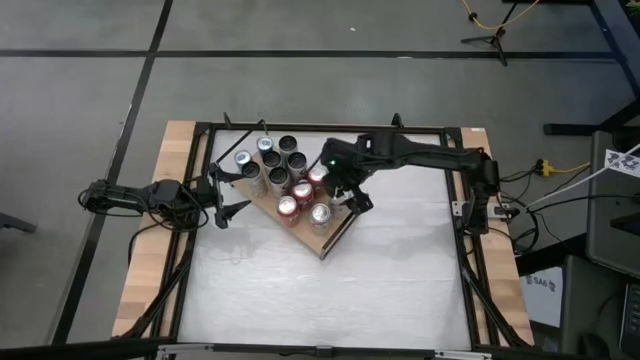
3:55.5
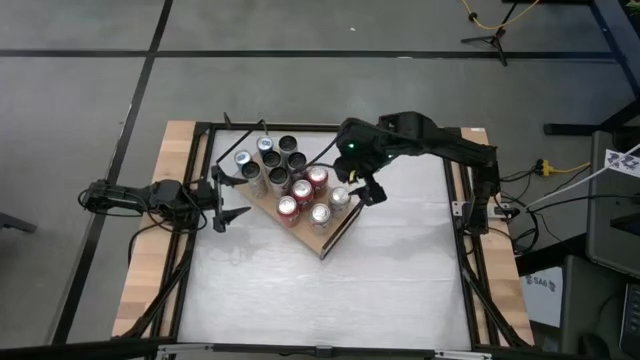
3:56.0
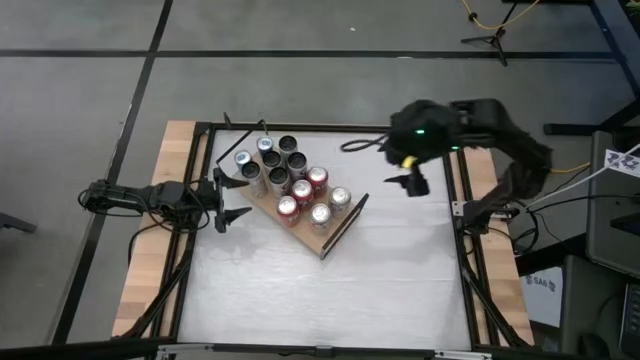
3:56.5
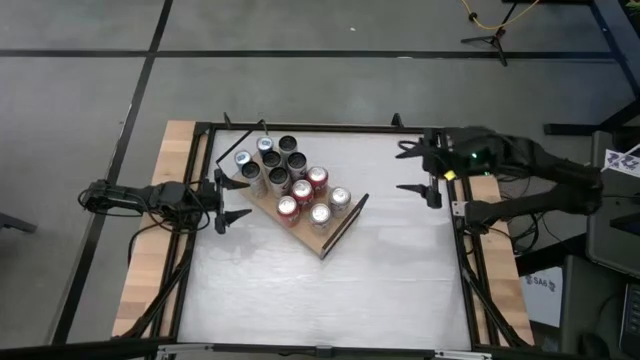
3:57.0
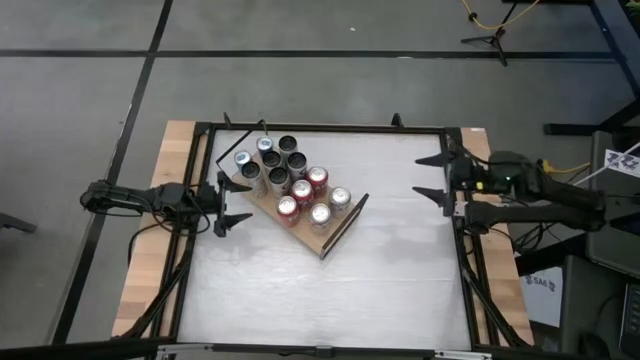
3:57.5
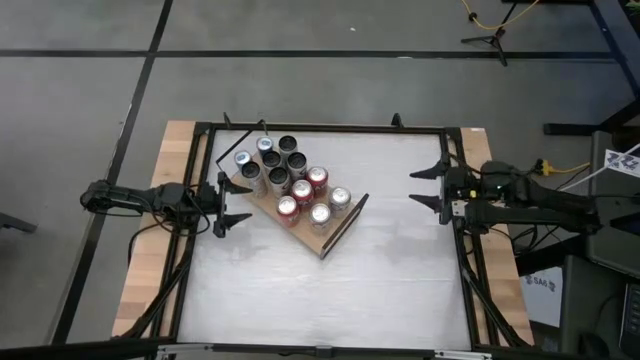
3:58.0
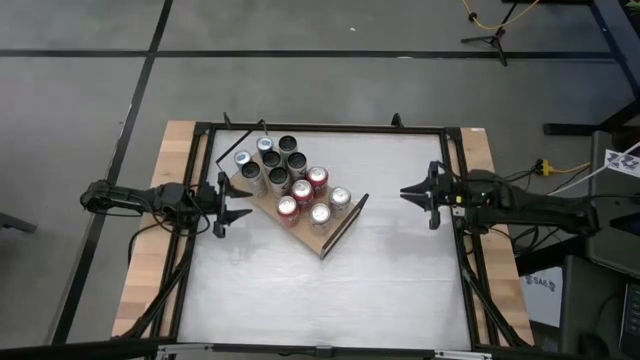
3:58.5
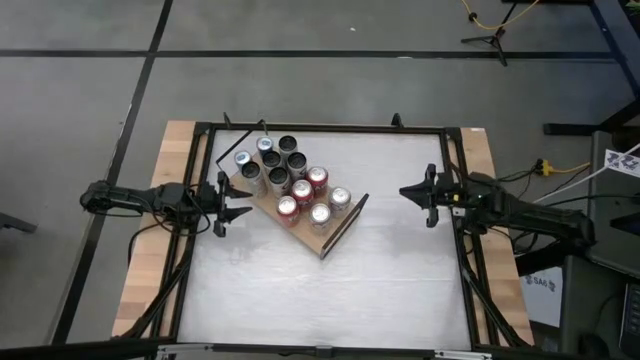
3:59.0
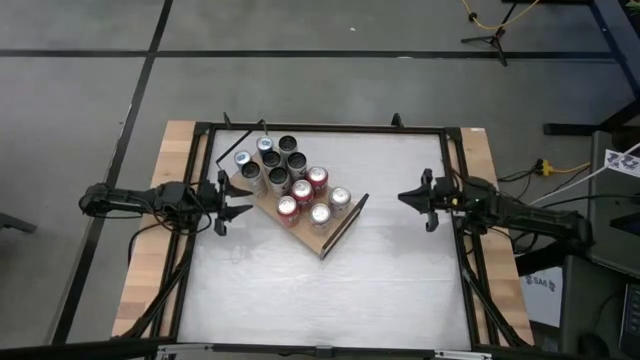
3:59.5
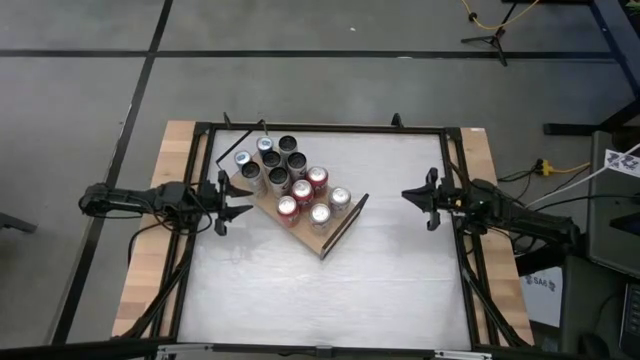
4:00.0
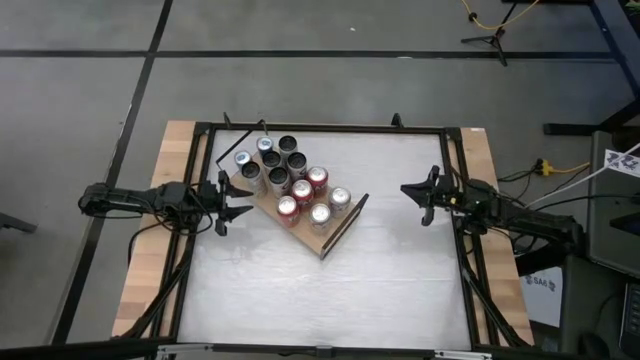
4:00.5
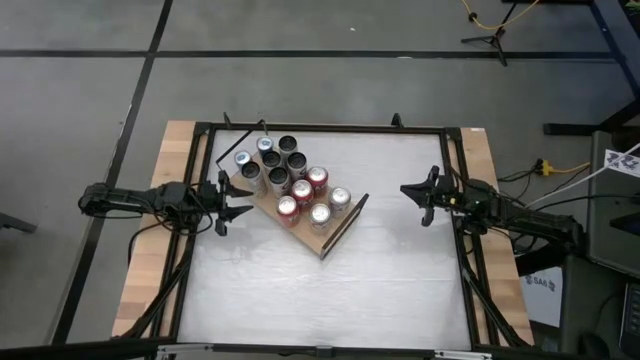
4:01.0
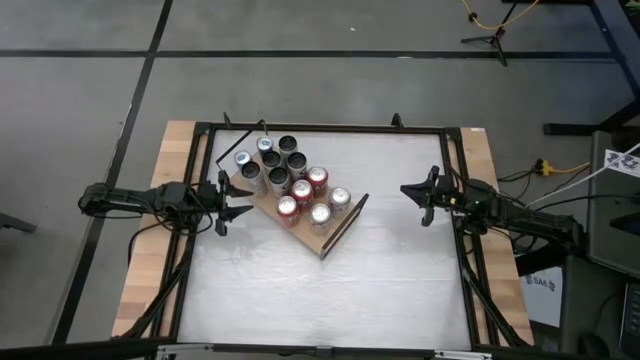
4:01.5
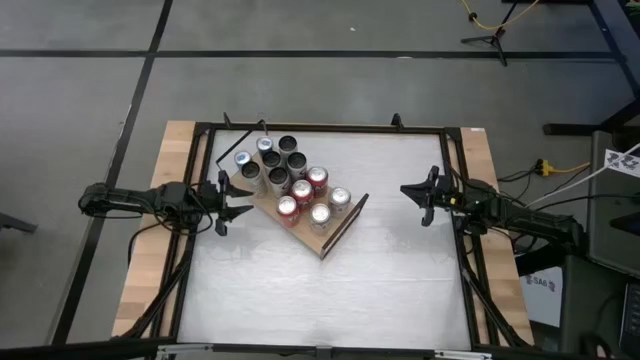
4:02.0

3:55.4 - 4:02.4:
Task: Place canned beverage on shelf
Return to Home Position

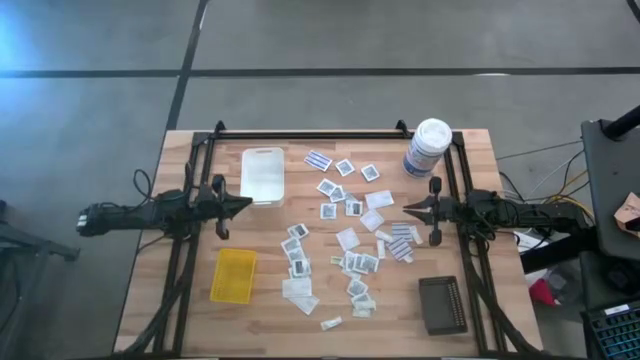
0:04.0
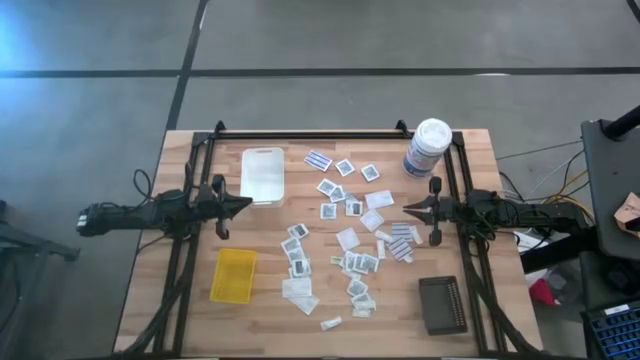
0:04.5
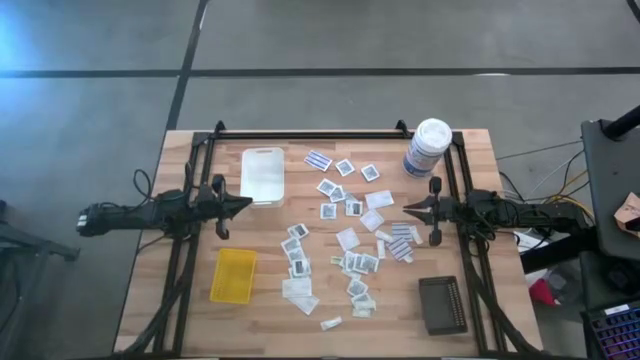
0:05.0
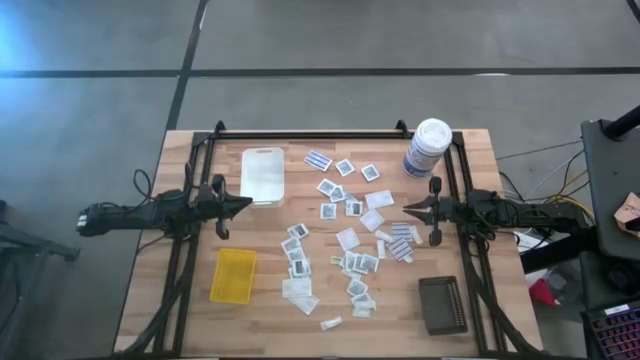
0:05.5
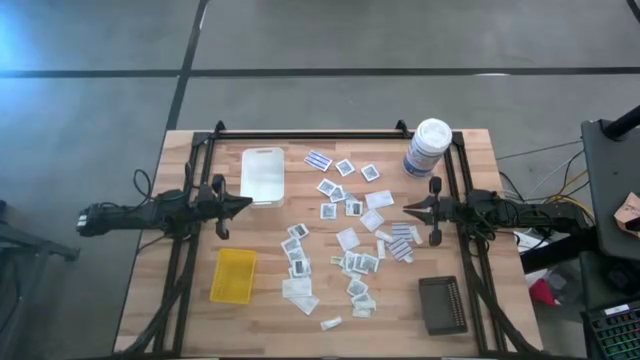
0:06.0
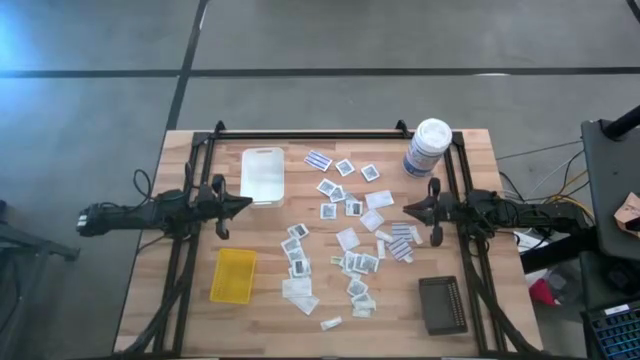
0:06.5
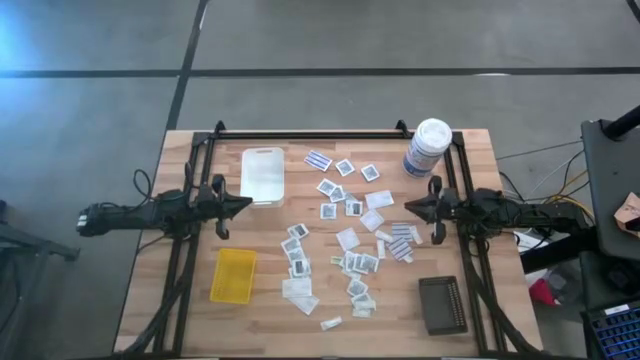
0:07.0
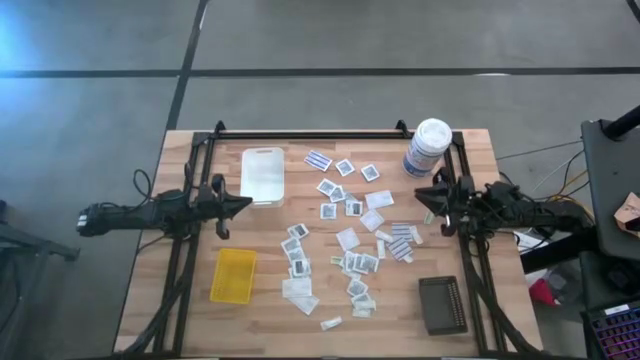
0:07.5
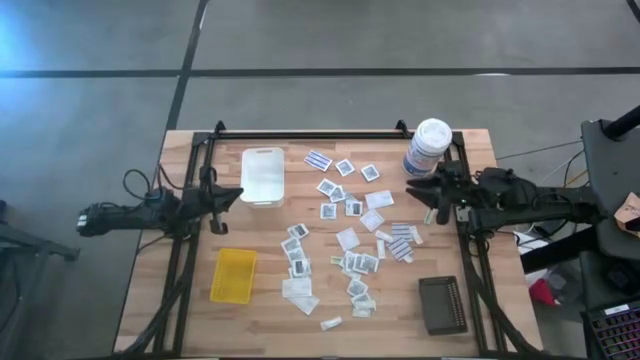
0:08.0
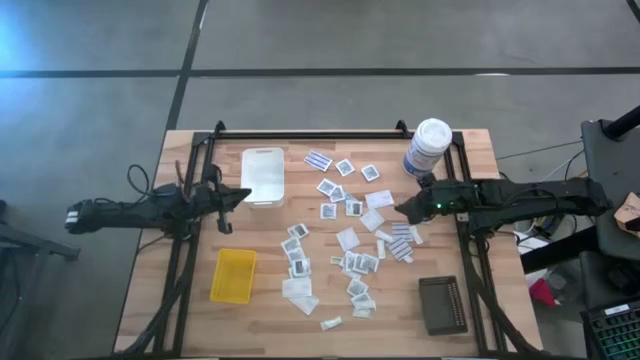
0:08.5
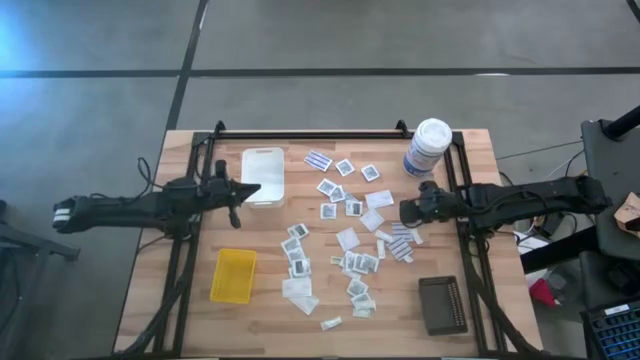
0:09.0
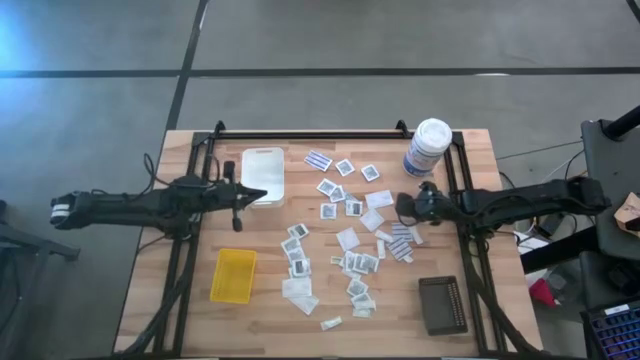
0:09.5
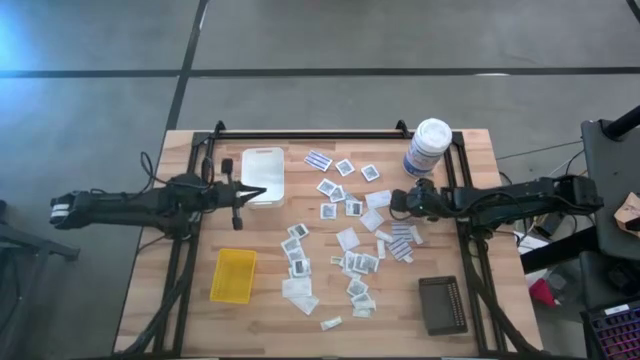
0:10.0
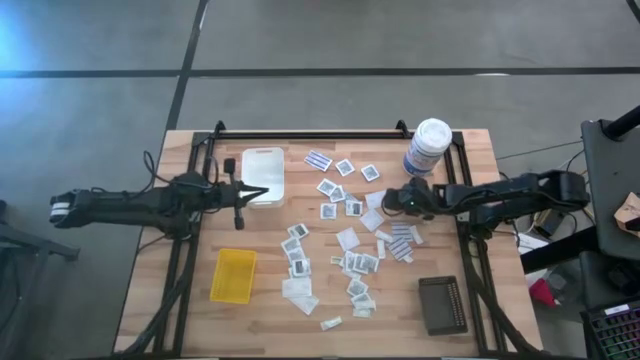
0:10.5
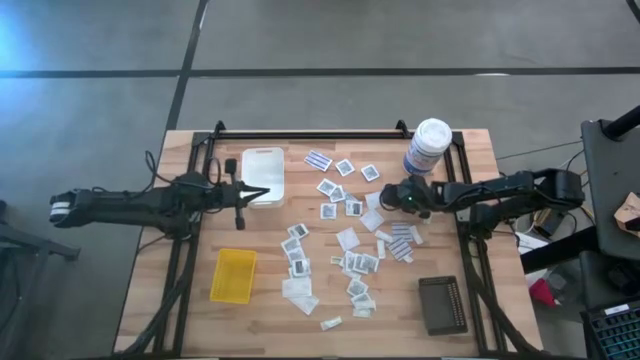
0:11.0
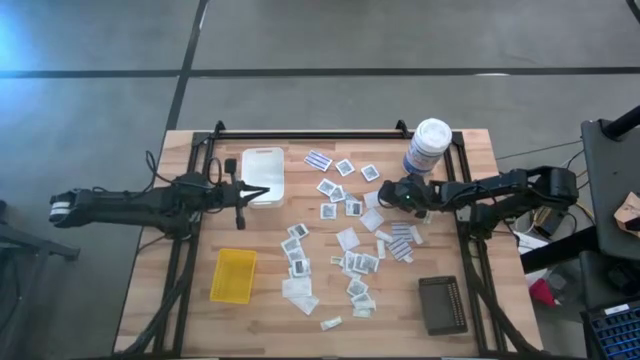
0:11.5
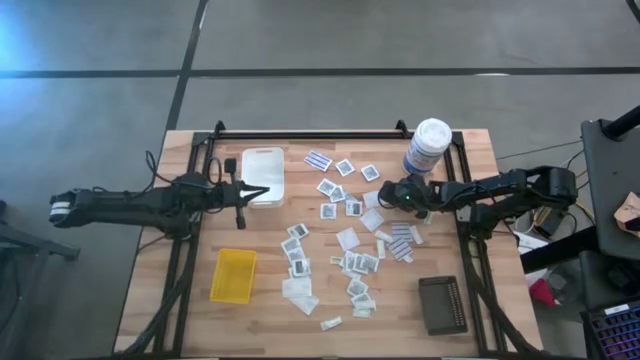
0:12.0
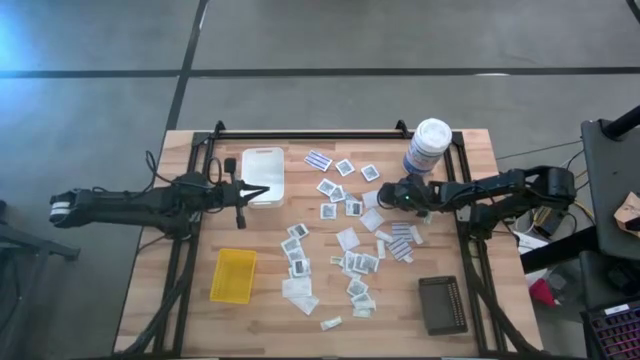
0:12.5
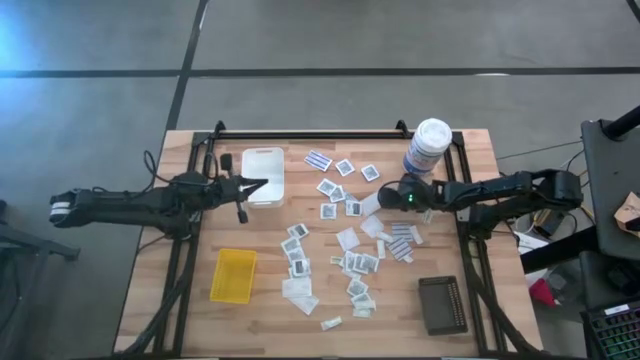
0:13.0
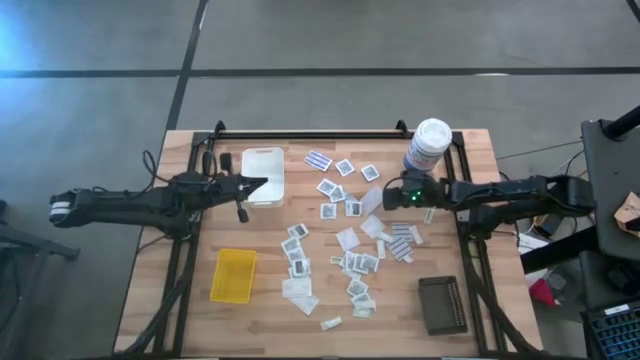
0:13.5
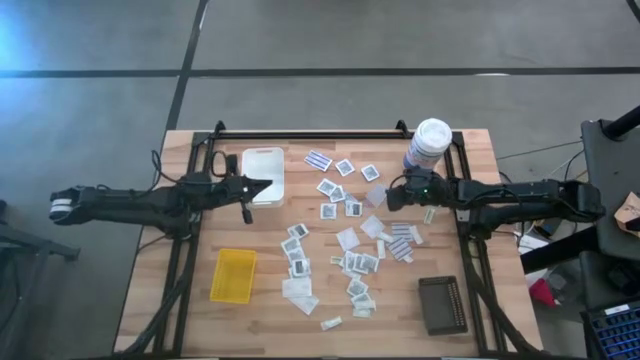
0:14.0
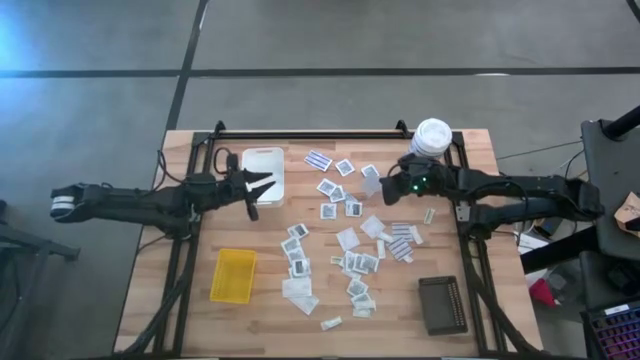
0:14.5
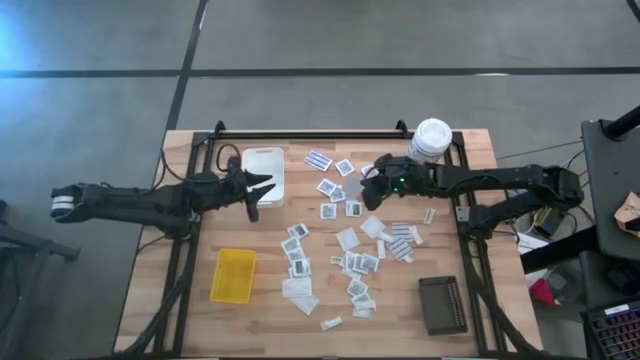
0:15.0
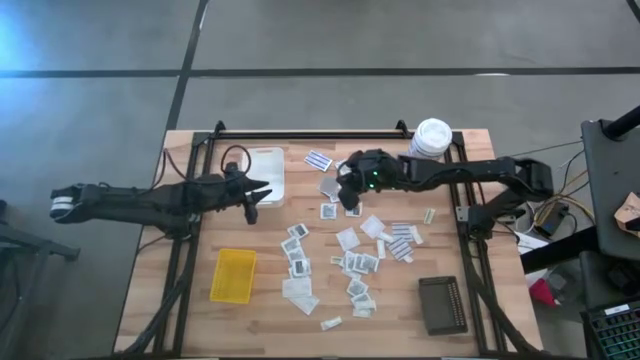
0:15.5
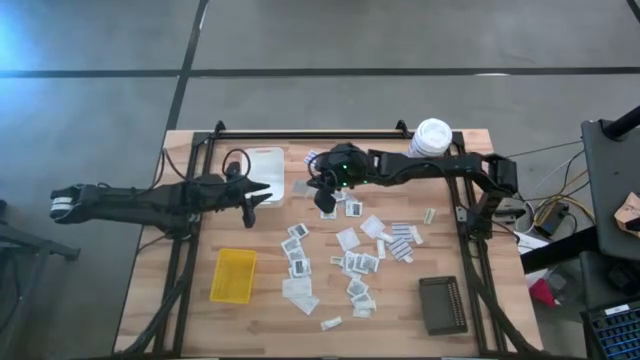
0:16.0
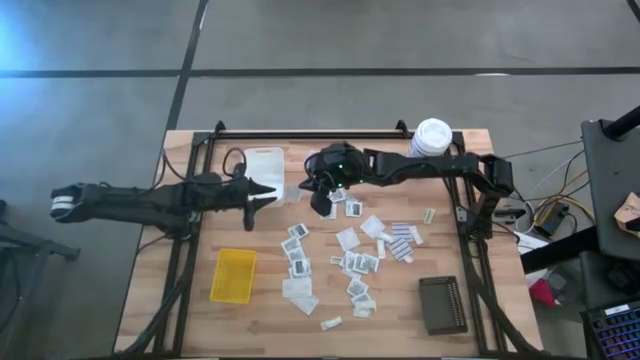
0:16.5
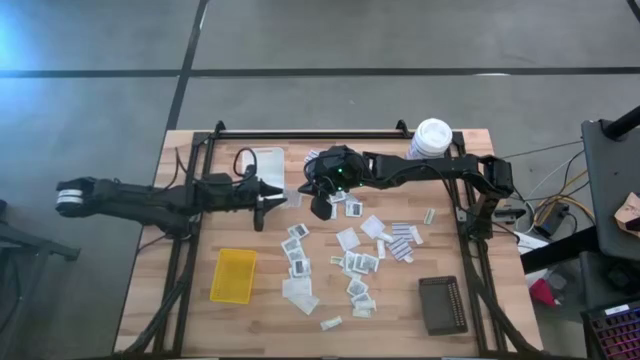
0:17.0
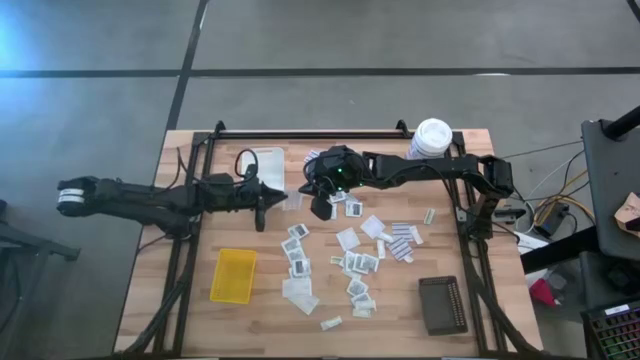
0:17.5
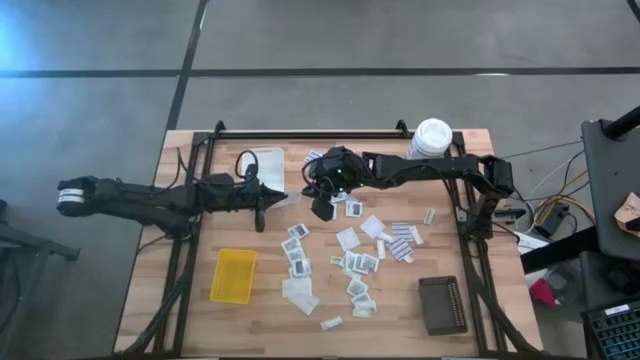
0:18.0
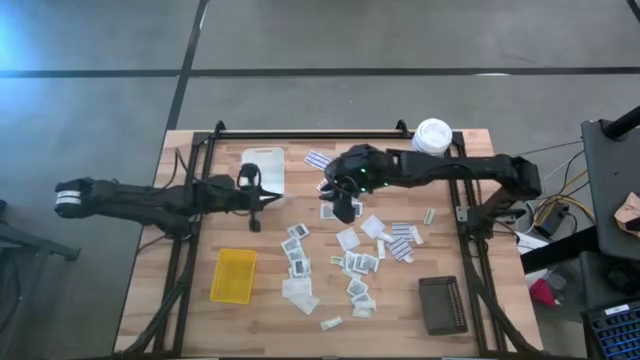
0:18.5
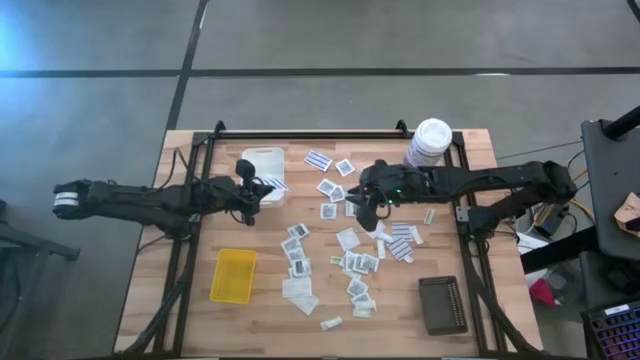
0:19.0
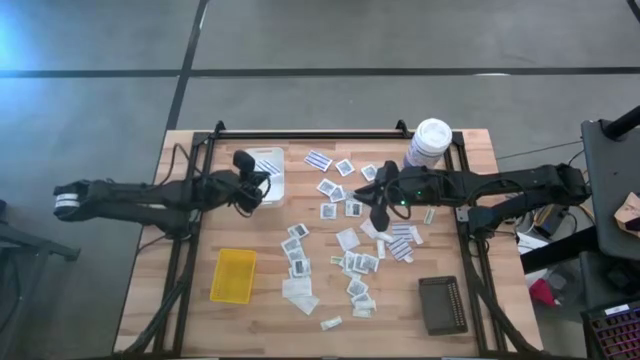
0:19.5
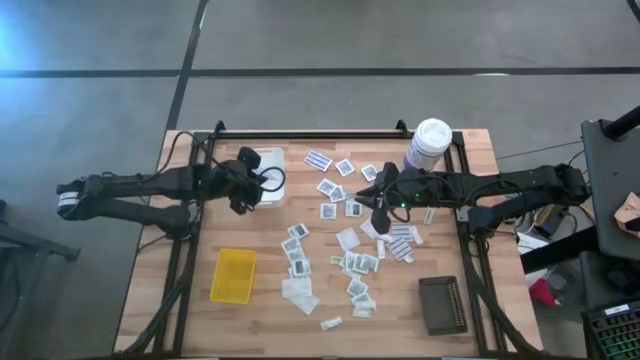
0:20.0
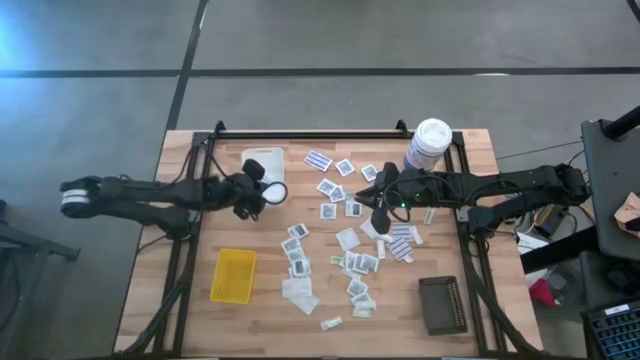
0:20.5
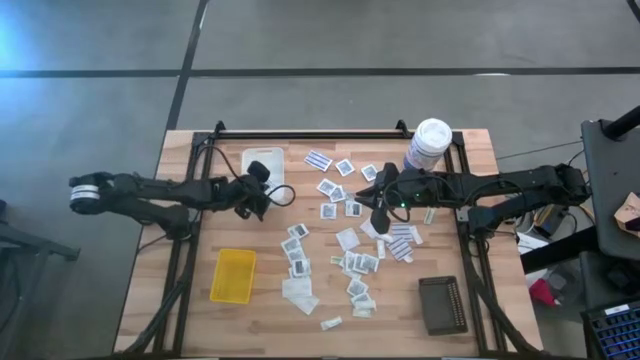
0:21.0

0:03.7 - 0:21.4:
Task: Pick & Place First Aid Supplies
Put the blue bandage into the white bin
